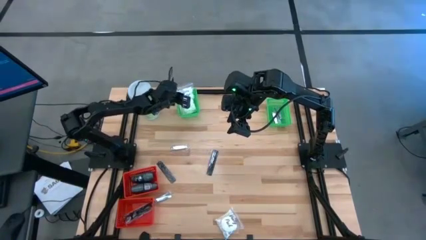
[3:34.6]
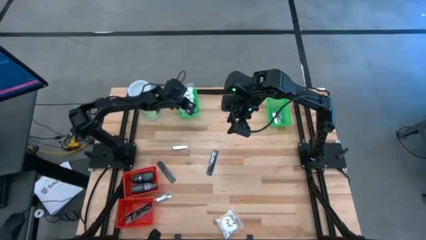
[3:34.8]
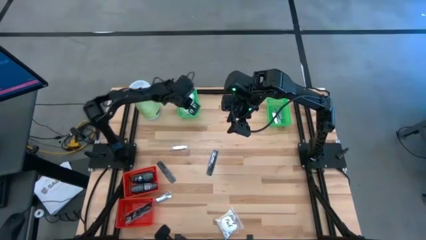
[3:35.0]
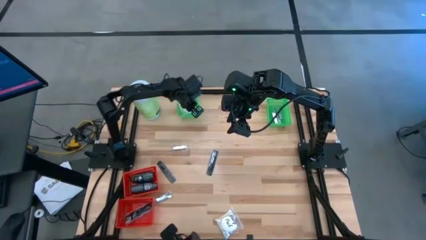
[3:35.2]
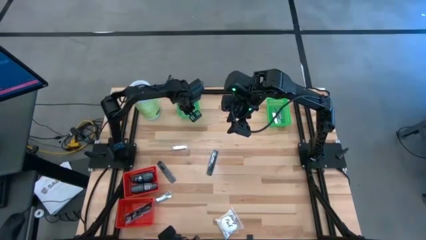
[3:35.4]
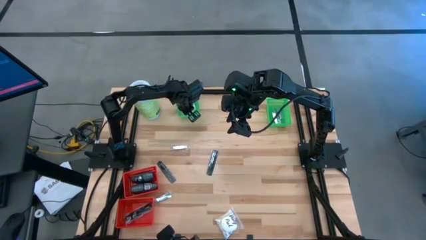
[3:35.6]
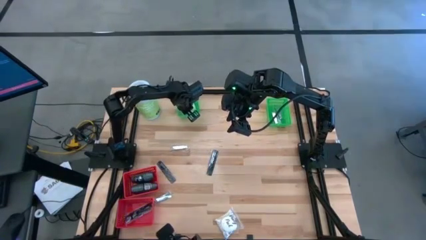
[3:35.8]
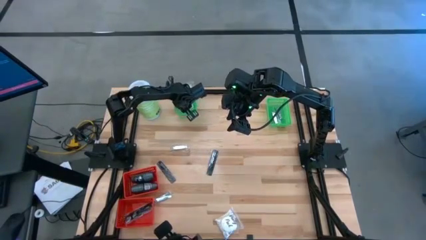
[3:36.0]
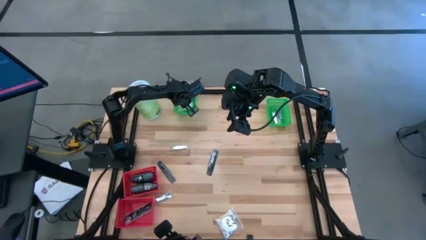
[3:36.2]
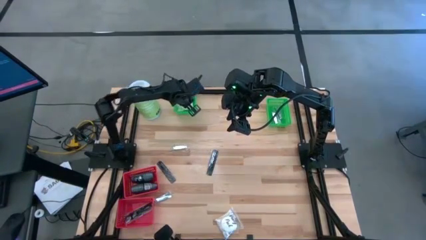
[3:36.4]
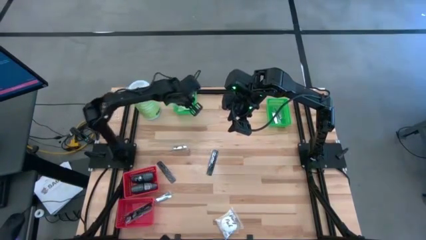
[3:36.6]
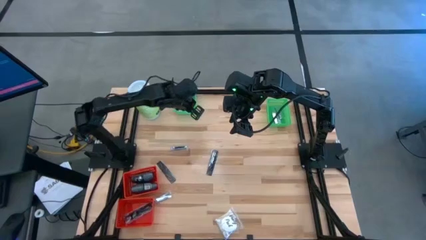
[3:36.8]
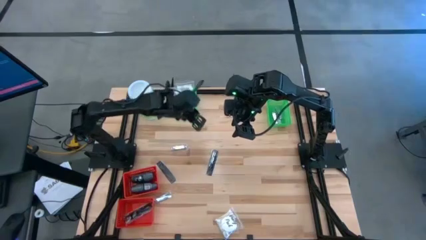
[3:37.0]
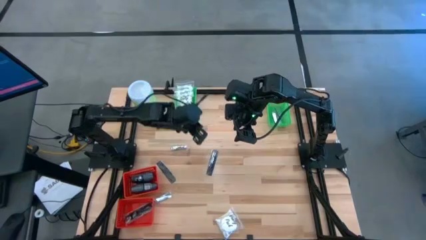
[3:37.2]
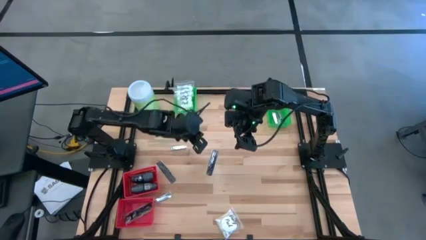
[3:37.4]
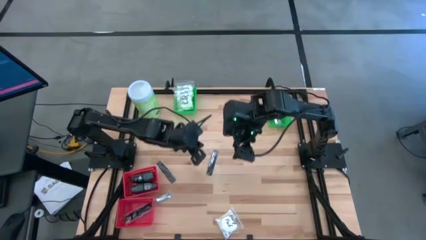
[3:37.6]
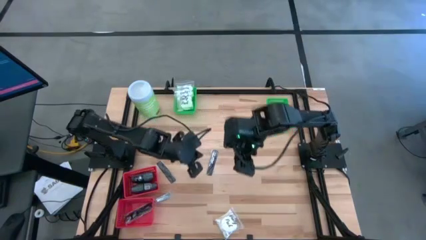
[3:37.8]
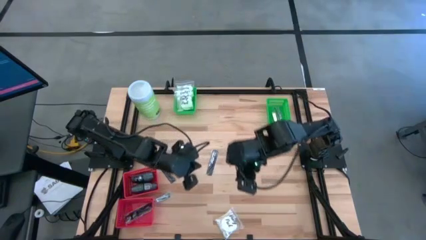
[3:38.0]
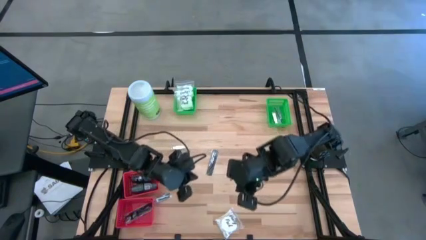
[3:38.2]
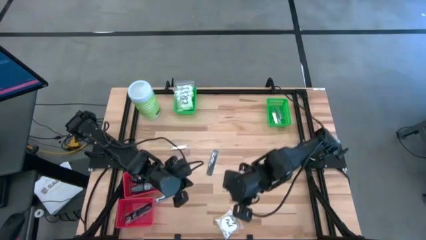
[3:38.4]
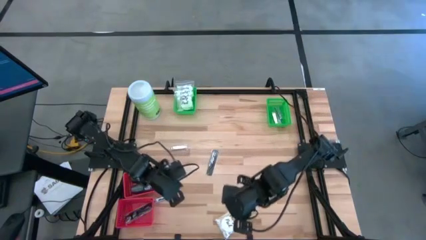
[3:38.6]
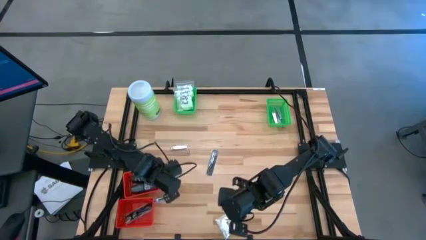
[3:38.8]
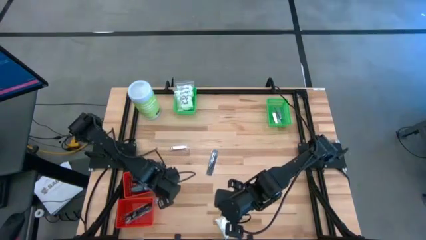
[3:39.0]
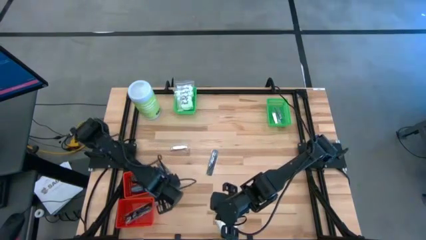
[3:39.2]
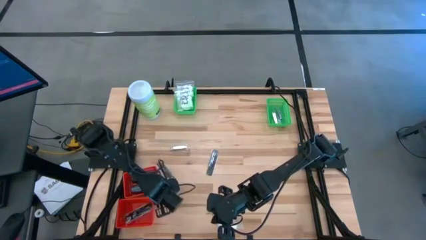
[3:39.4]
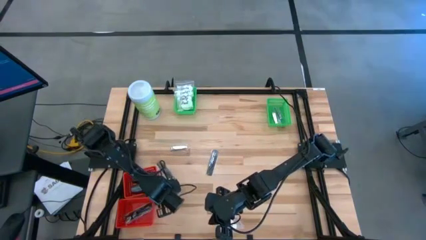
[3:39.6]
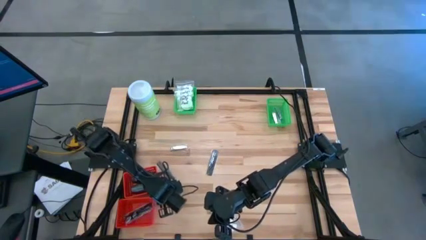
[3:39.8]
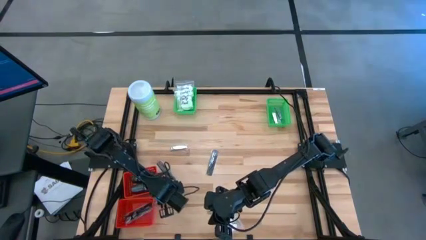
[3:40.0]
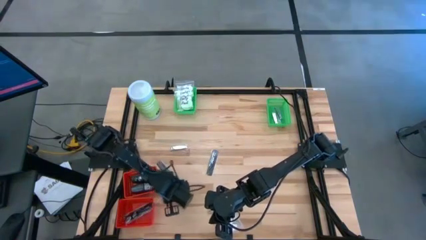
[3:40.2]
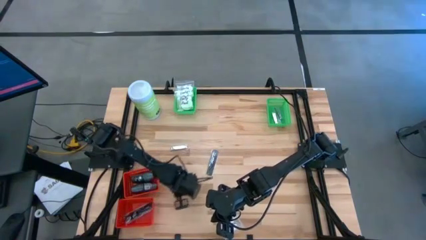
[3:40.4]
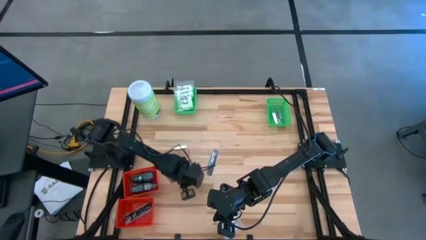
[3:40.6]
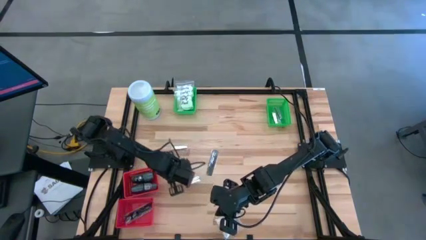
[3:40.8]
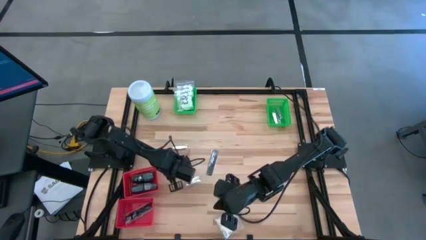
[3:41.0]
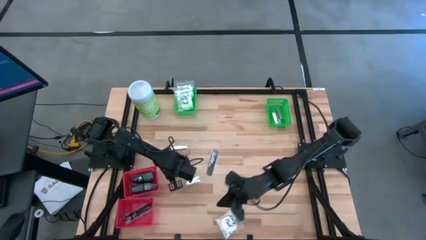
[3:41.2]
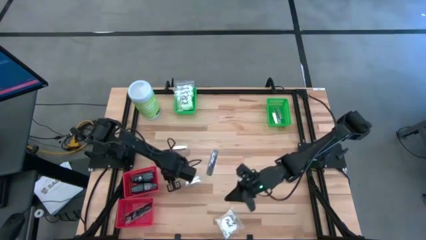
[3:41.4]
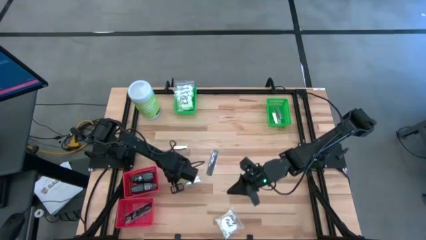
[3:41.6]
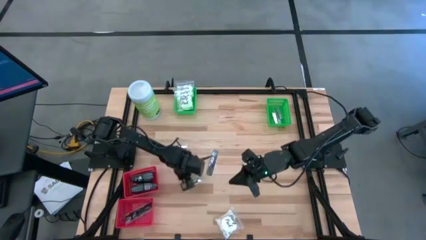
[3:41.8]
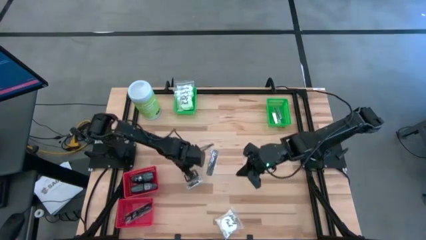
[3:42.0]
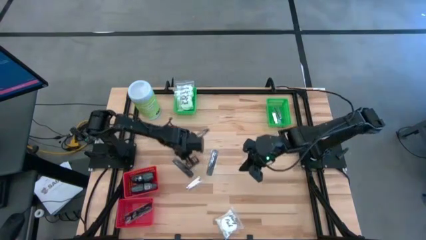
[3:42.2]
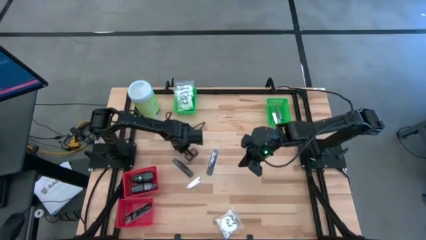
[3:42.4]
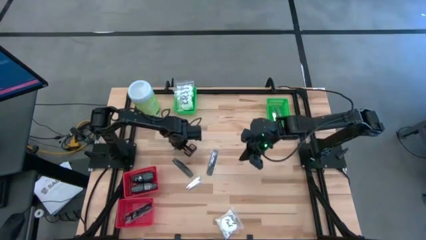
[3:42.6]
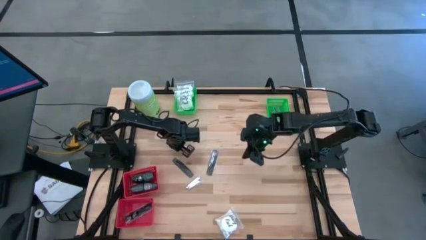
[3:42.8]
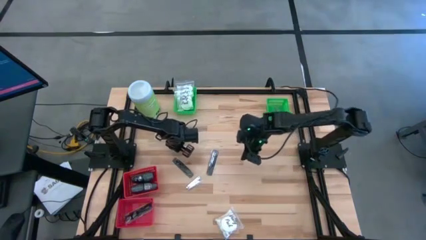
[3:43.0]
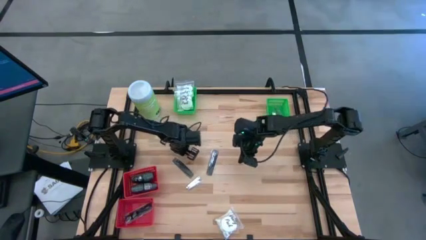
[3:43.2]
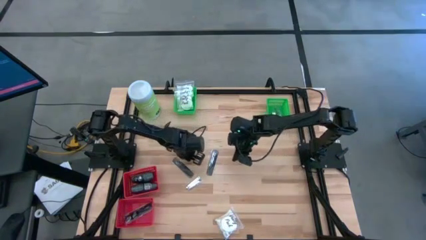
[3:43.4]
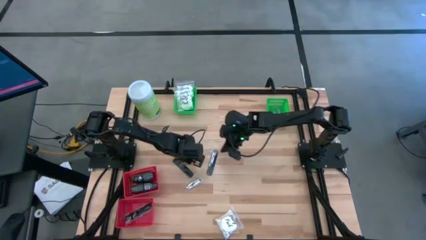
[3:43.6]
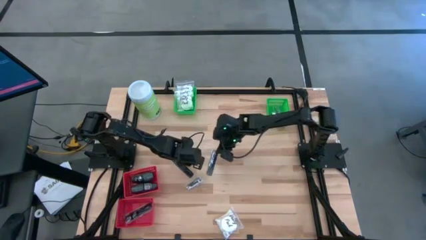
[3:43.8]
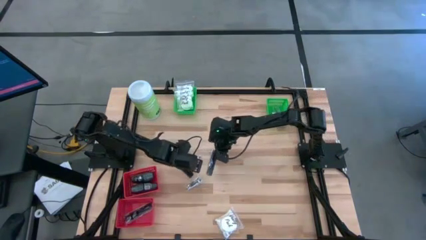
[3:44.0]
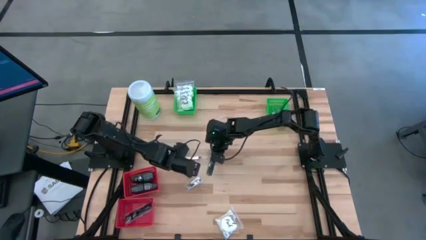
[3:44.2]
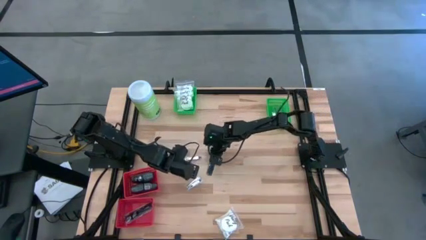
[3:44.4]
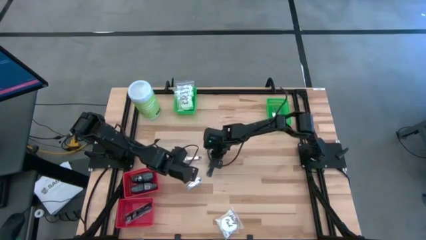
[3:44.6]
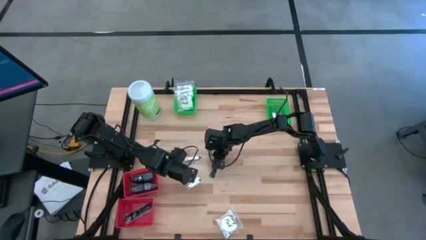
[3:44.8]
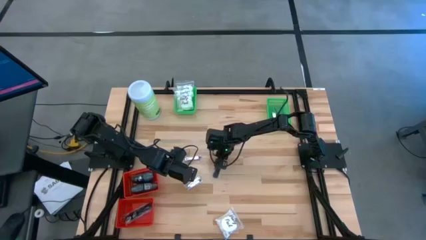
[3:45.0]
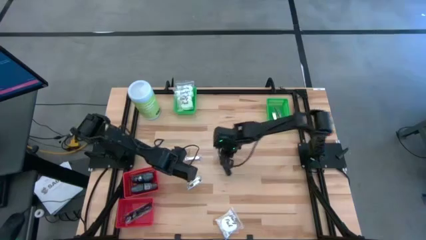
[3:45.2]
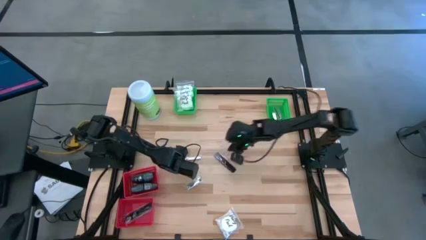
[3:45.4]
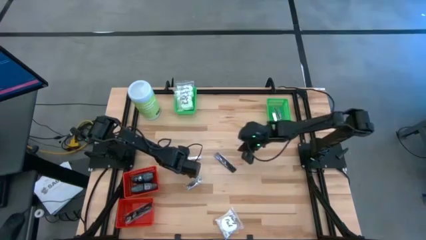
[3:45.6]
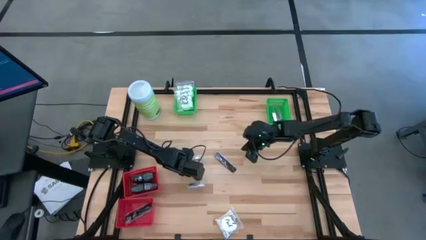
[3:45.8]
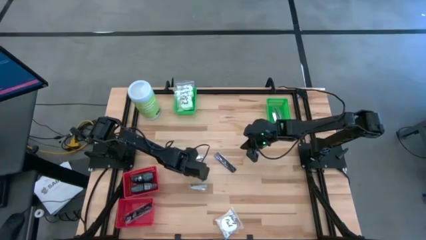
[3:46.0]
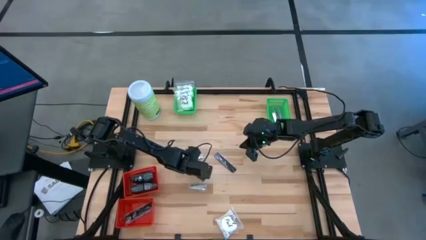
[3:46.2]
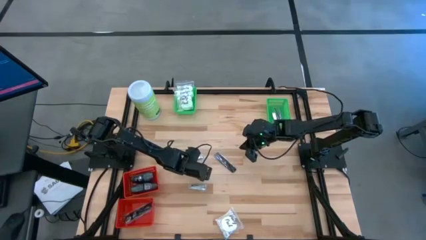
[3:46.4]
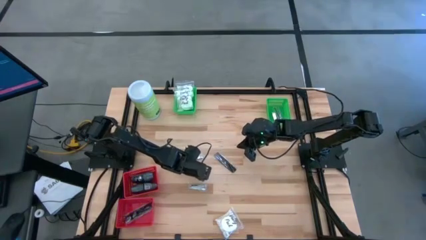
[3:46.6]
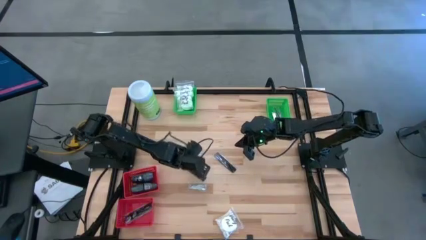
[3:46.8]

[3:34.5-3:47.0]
Task: Pick & Place Travel size toiletries
Put the black comb into the bottom red basket

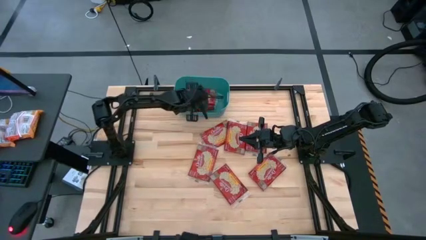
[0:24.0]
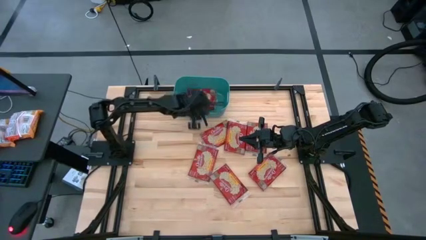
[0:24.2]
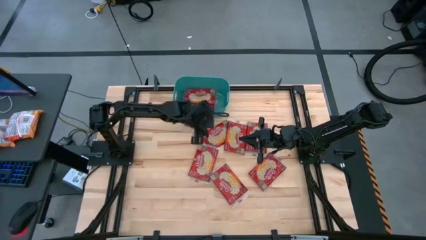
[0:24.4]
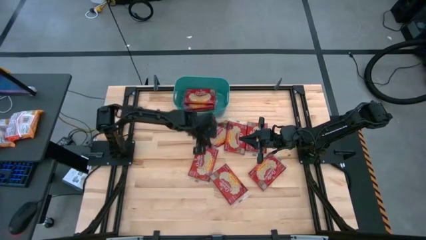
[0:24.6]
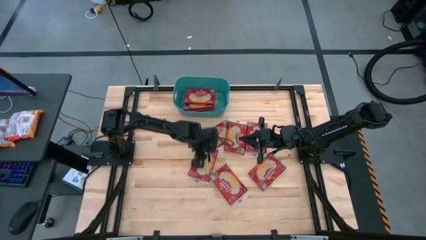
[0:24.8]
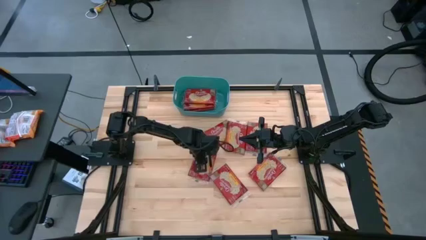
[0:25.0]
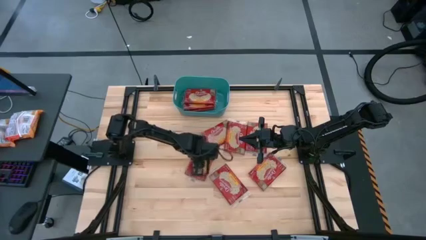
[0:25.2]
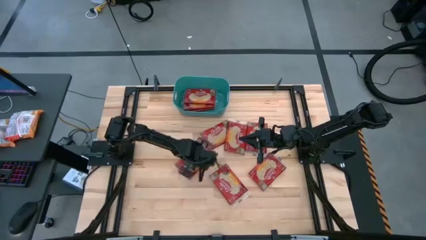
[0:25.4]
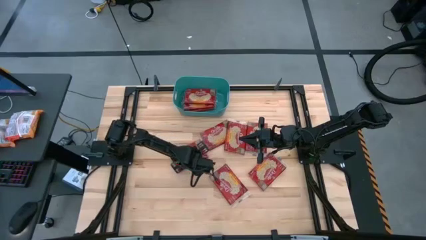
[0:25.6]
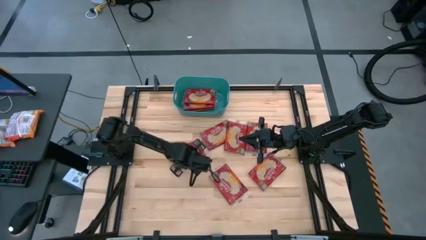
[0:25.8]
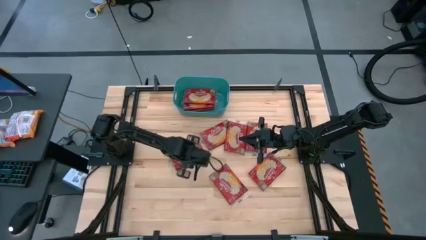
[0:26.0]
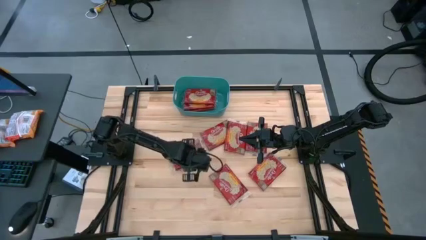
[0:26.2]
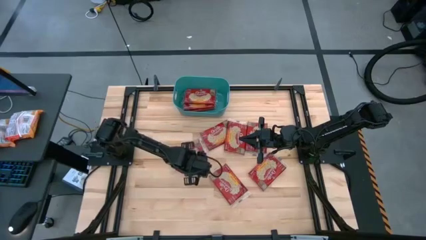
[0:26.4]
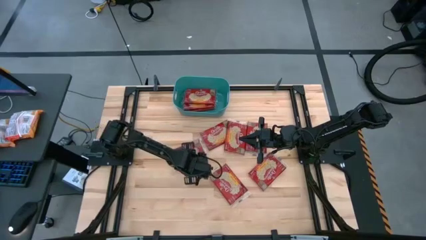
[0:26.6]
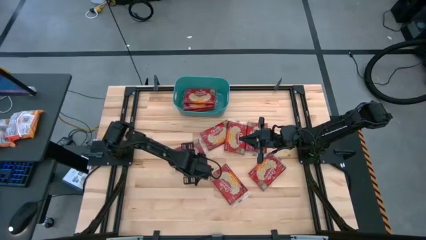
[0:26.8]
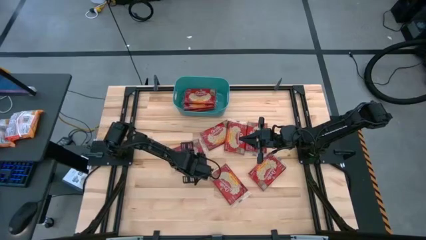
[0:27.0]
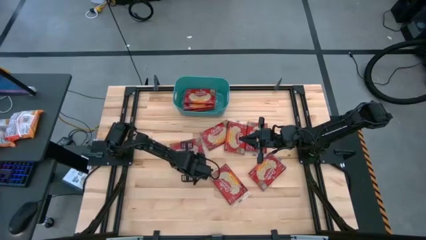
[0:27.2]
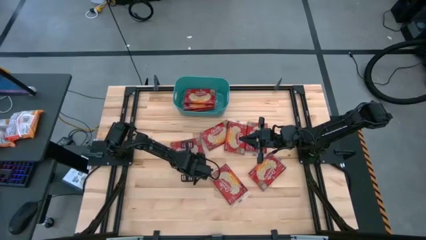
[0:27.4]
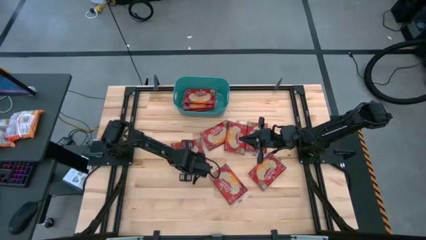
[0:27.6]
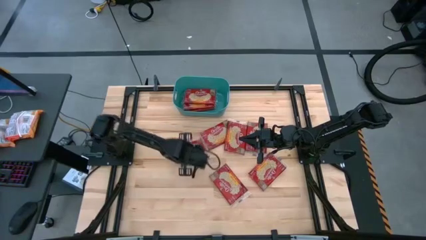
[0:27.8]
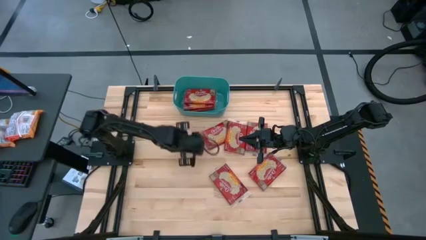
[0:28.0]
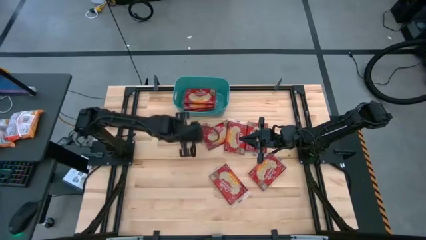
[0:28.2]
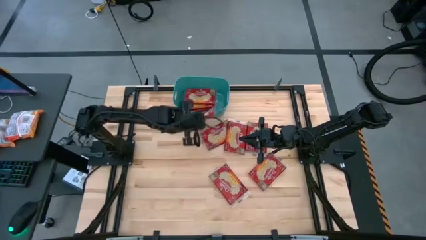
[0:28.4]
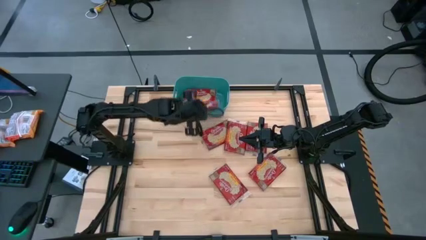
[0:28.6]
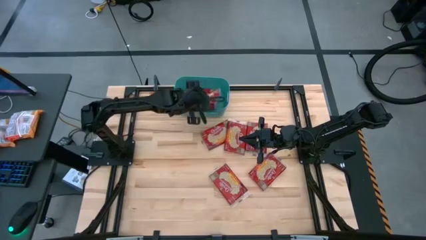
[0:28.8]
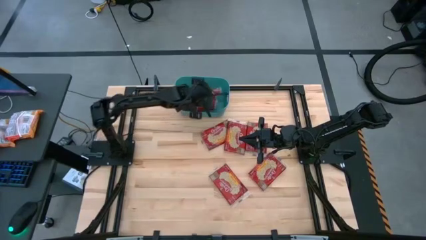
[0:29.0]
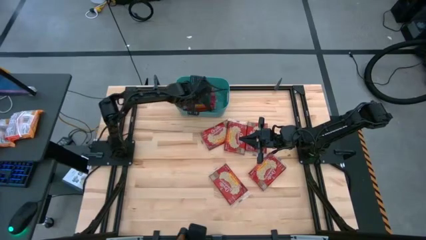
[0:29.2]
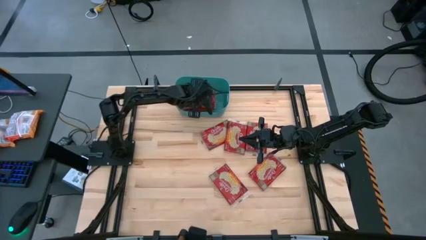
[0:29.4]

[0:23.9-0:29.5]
Task: Sort popcorn bags into baskets
Put the popcorn bag into the green bin
